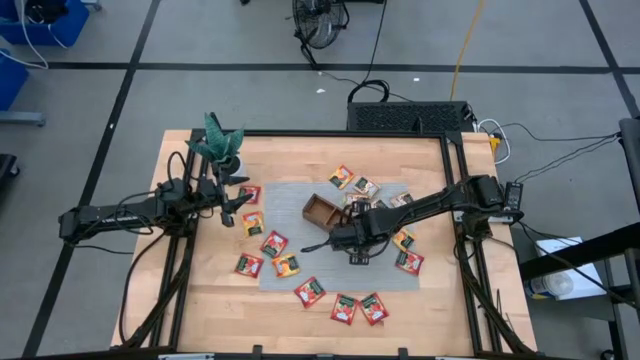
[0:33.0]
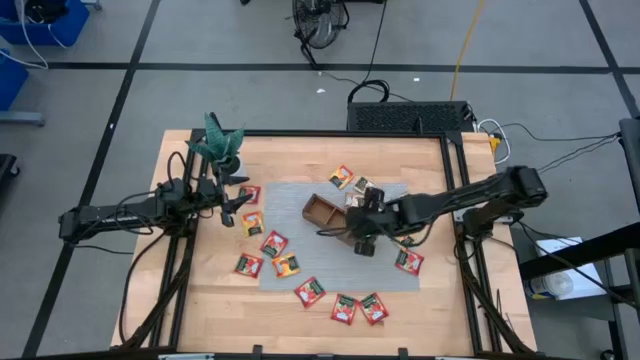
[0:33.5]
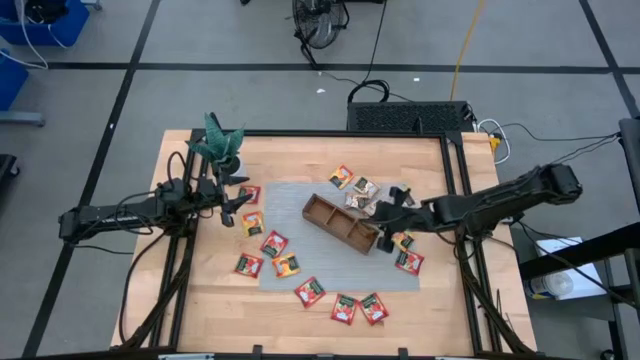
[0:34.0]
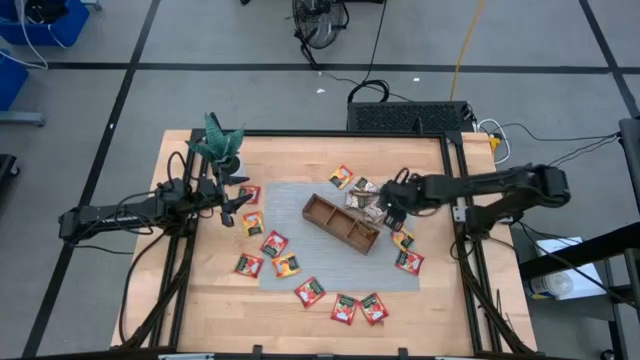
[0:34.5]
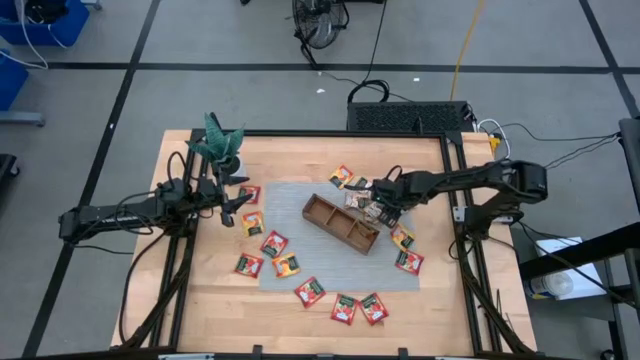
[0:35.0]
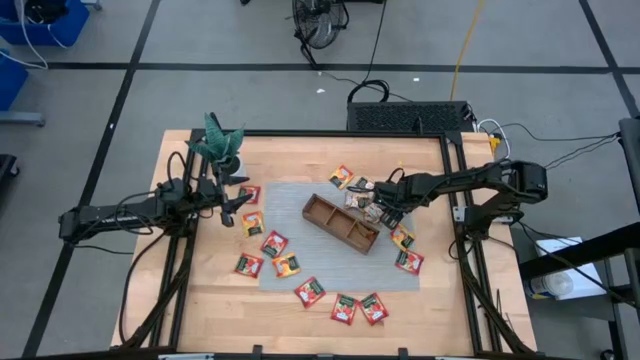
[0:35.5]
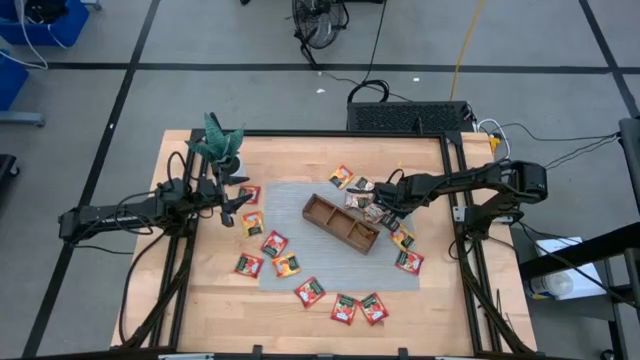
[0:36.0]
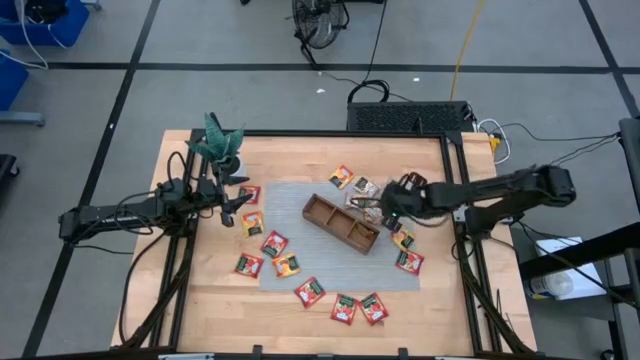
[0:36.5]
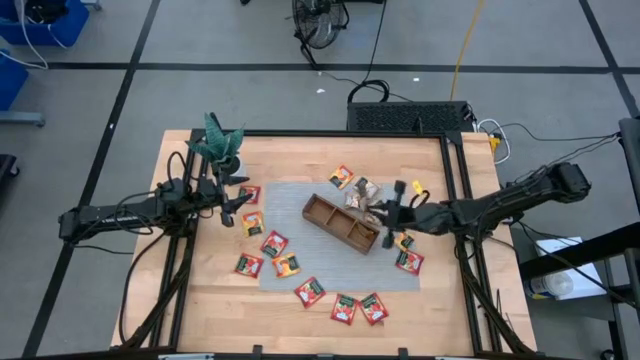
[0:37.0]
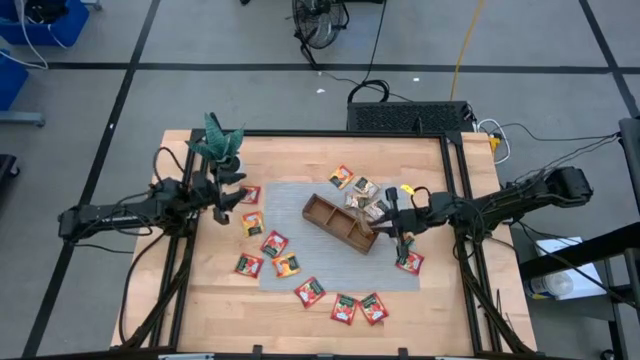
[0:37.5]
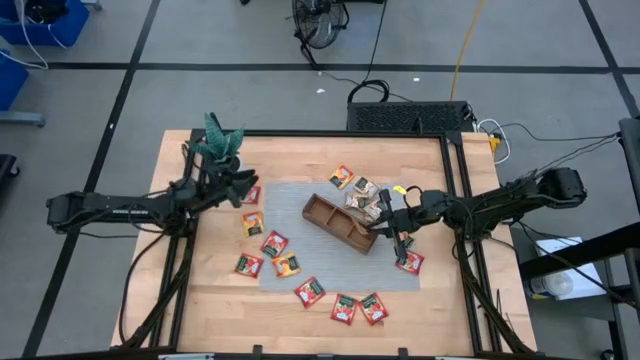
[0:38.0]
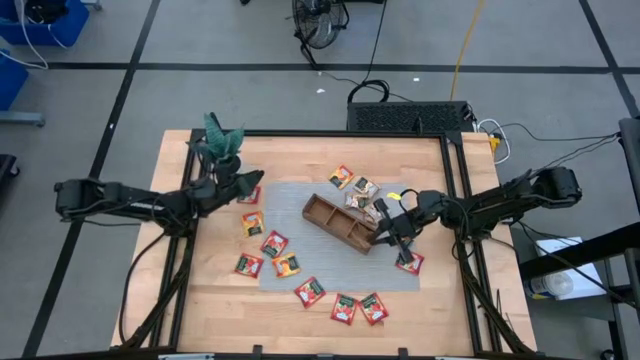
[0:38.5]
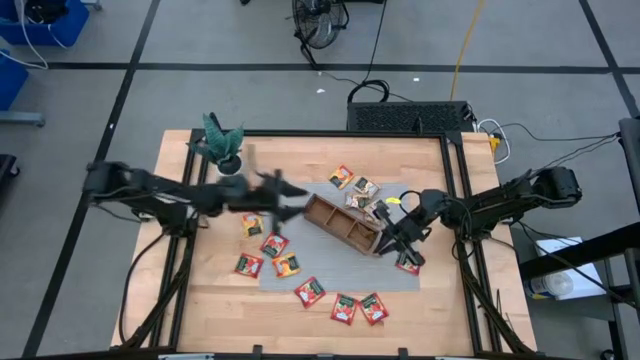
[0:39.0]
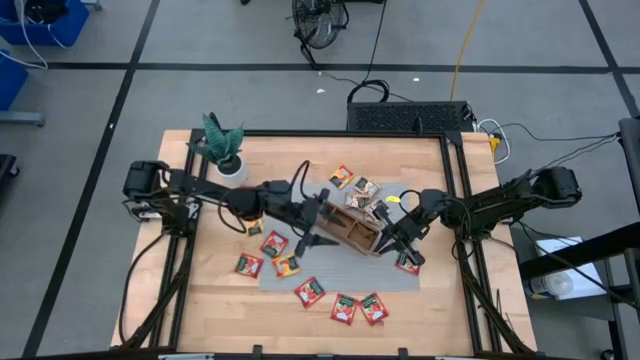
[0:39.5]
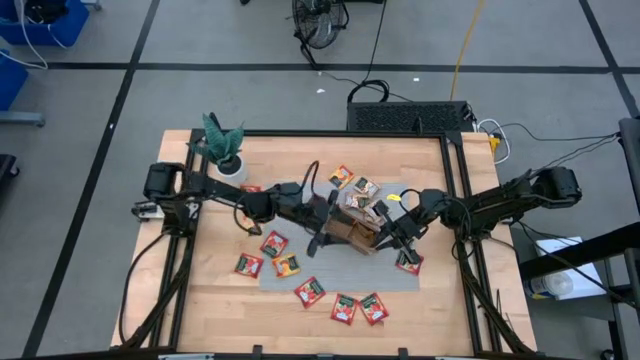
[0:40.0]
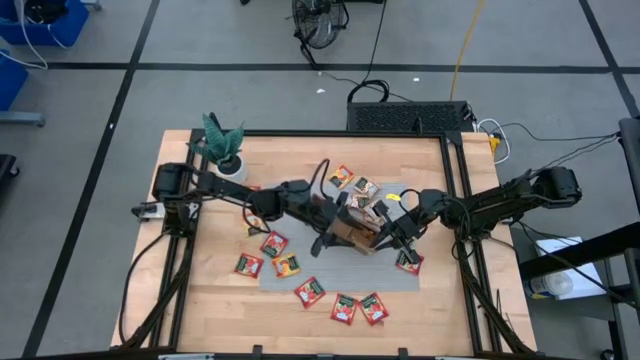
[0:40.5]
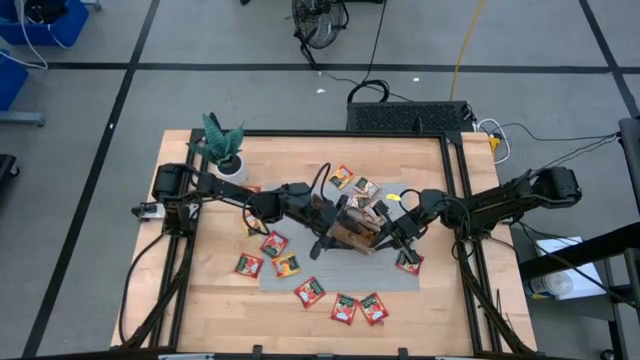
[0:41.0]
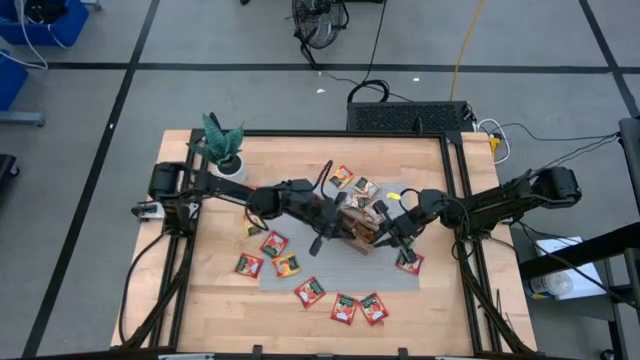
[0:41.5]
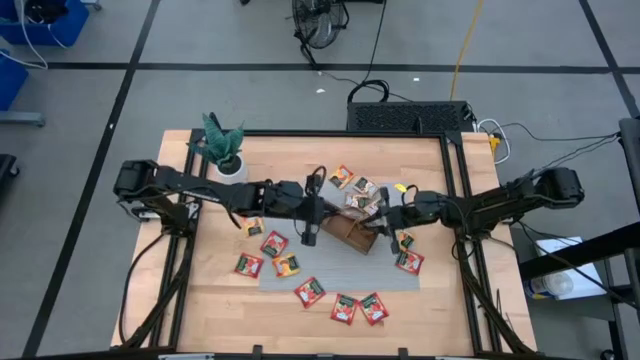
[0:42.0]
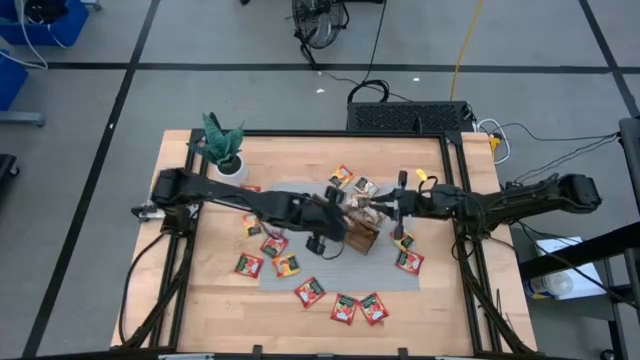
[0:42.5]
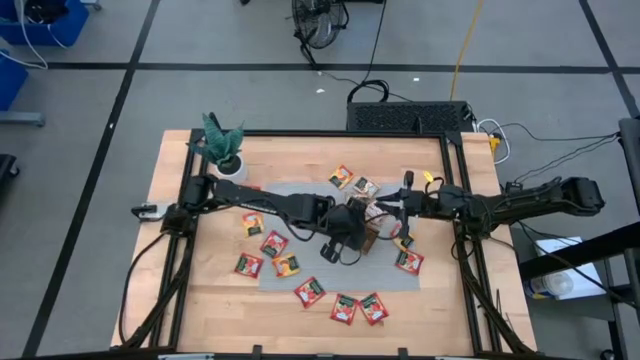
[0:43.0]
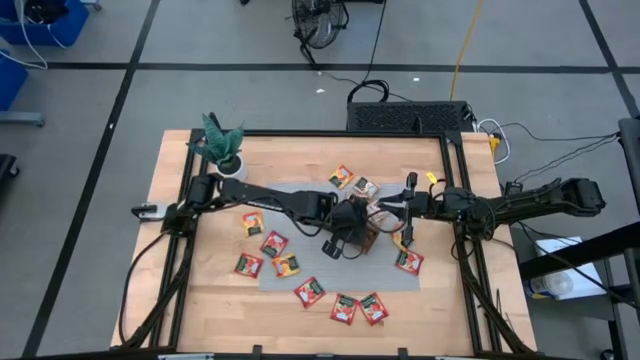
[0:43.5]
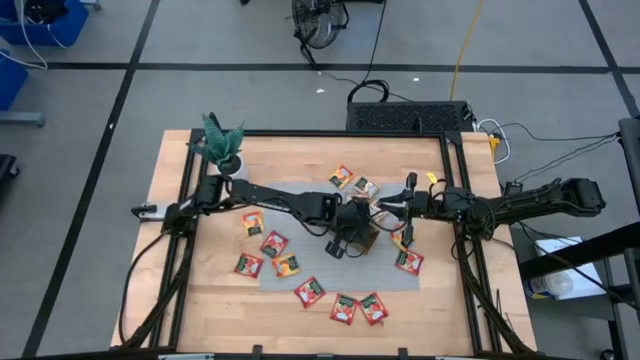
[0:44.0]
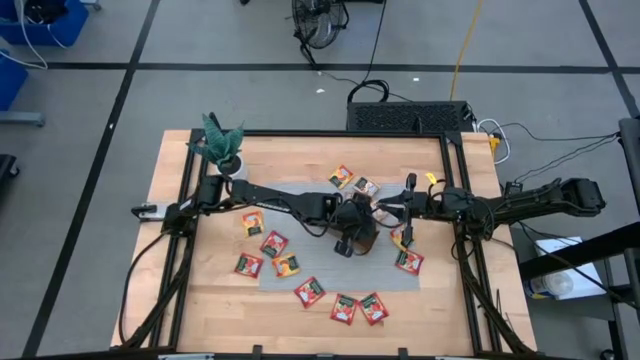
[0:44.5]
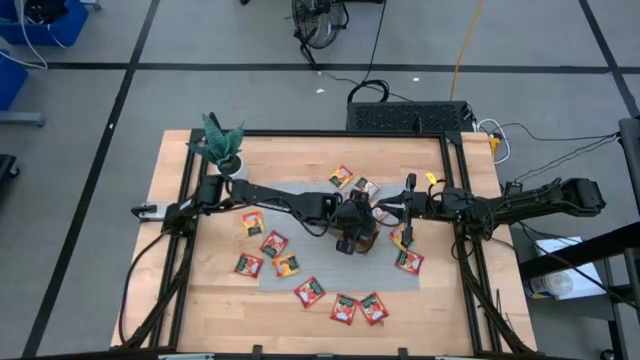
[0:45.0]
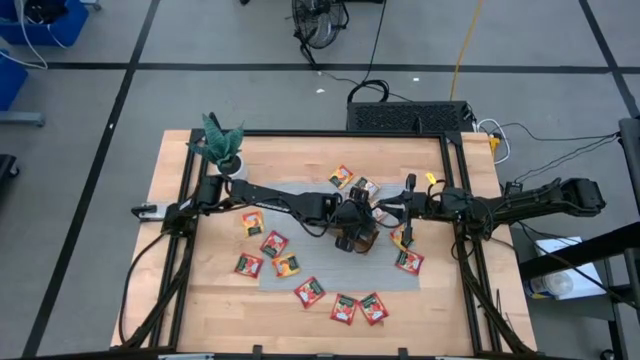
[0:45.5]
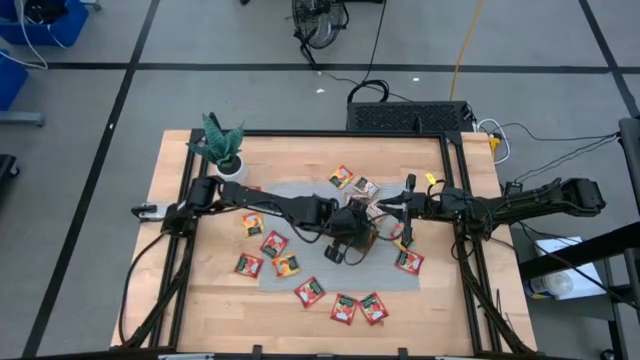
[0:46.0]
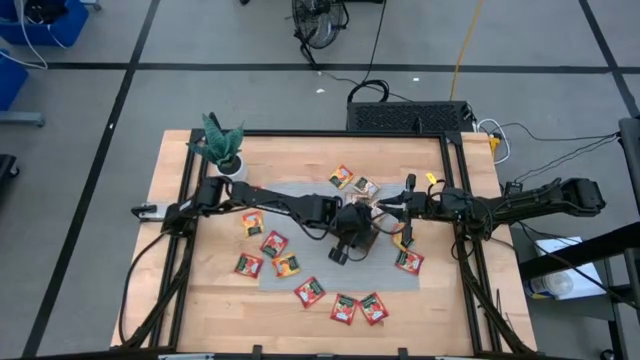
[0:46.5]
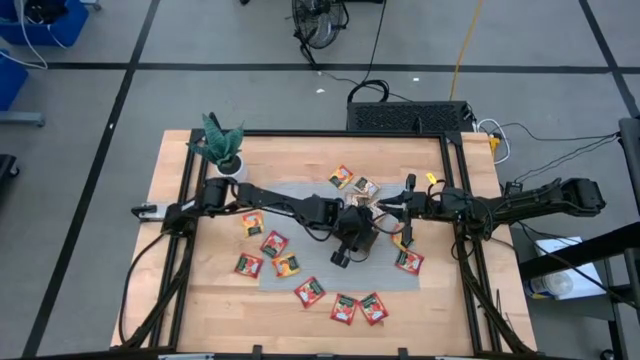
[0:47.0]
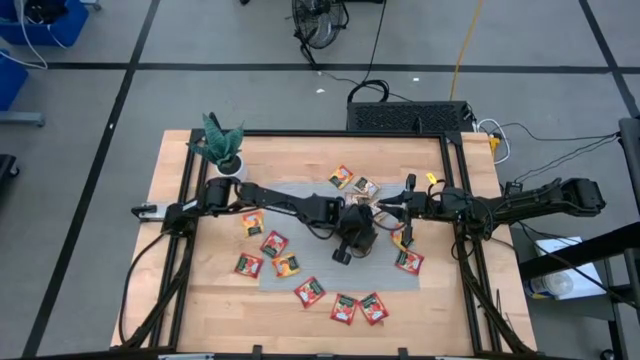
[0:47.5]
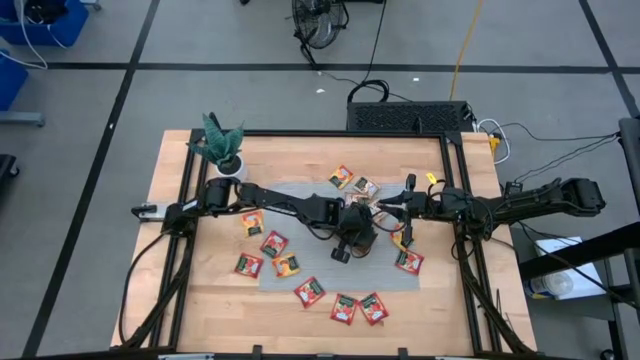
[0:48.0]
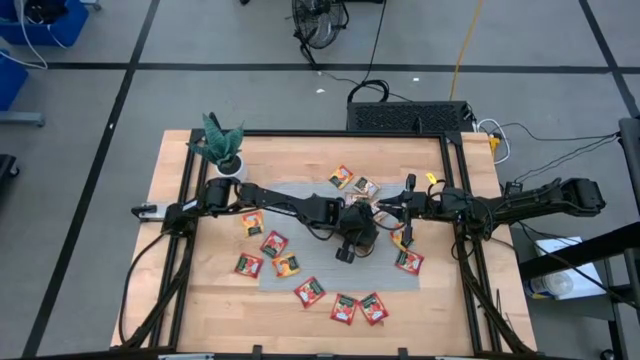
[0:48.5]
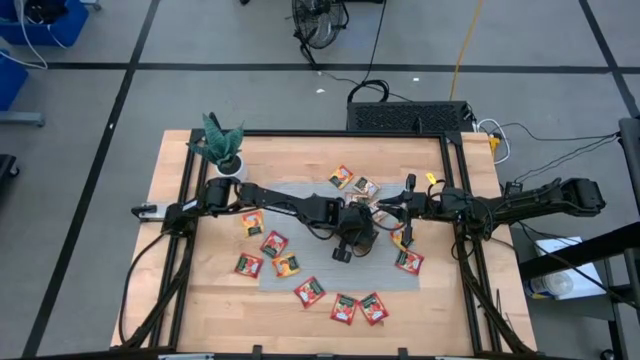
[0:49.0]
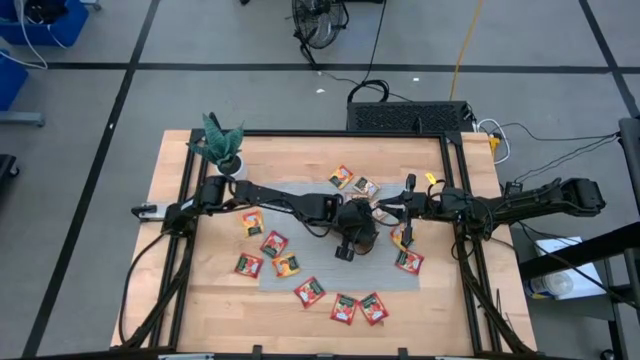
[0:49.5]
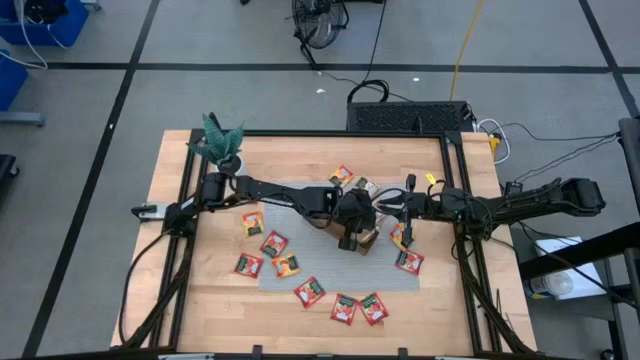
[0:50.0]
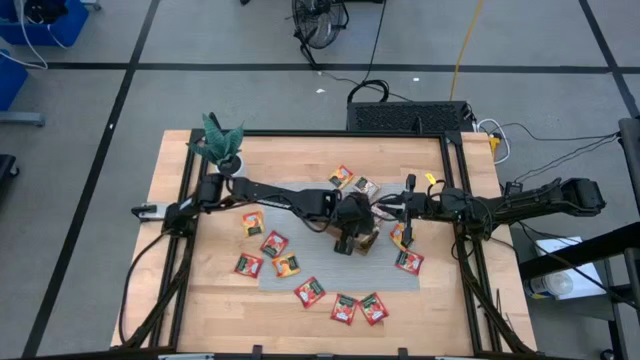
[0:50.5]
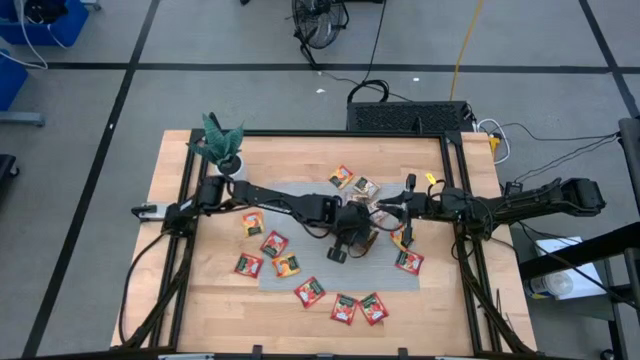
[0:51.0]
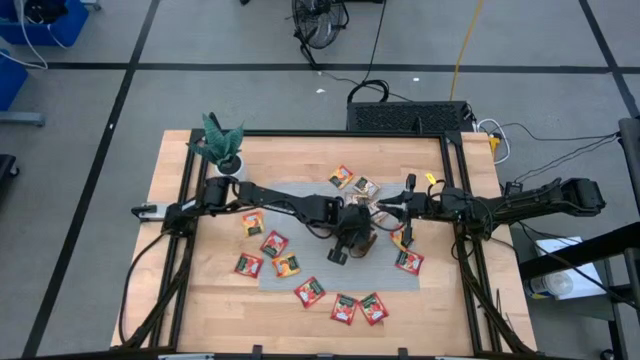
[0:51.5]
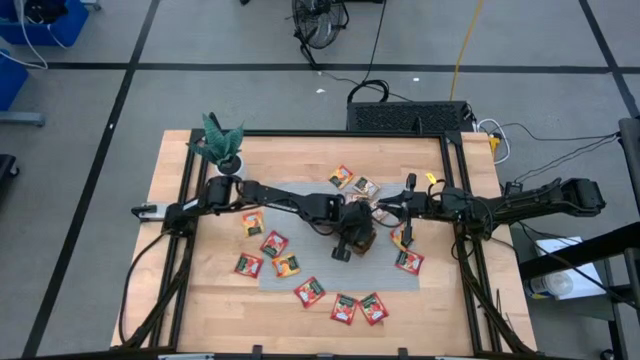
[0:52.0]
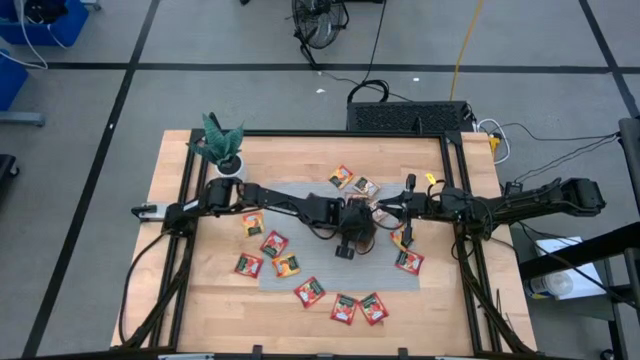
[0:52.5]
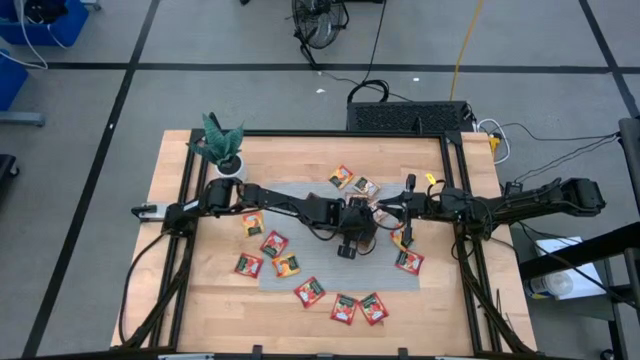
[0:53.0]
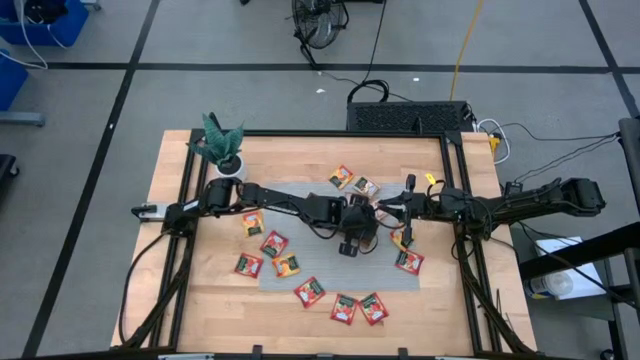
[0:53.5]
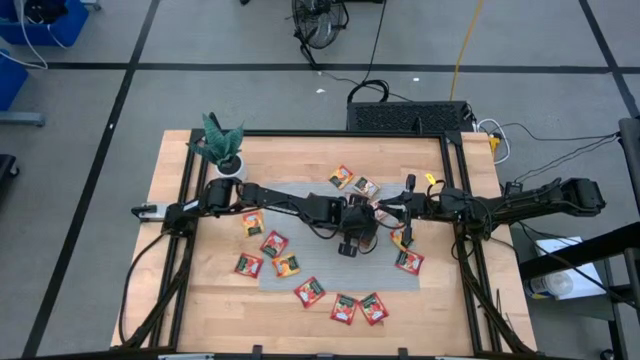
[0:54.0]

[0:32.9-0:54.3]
Task: Pick & Place Tea
Put the brown tea into the right part of the wooden organizer
